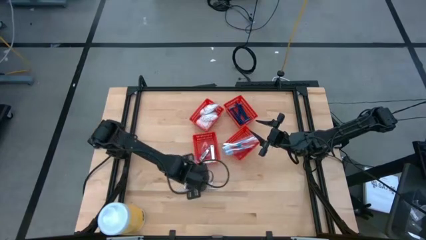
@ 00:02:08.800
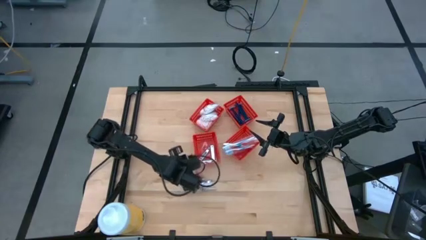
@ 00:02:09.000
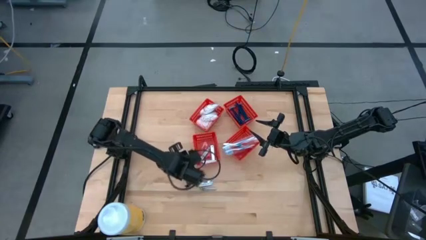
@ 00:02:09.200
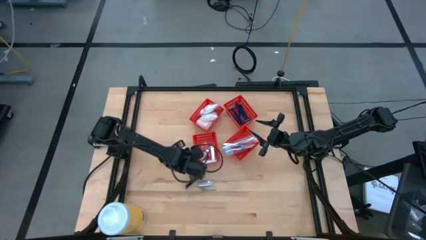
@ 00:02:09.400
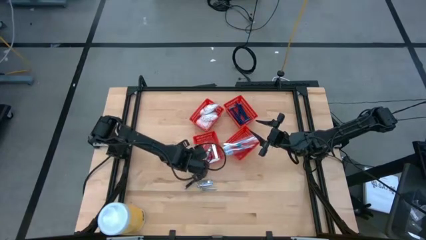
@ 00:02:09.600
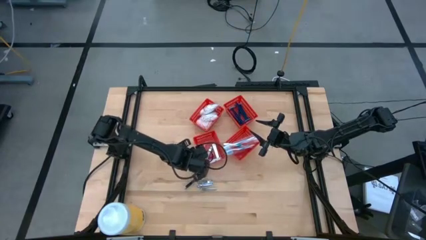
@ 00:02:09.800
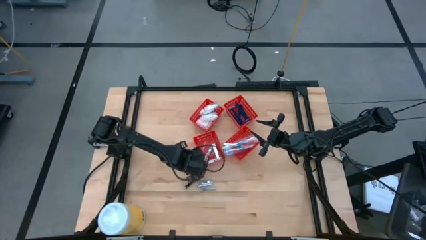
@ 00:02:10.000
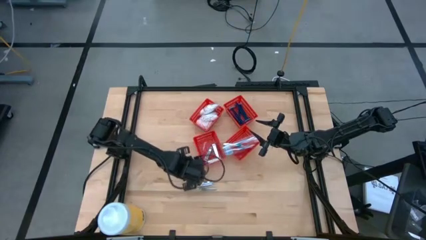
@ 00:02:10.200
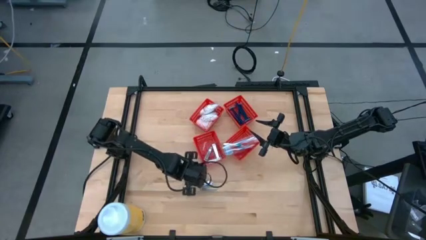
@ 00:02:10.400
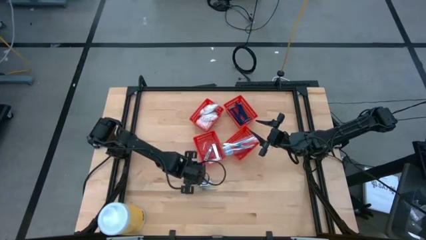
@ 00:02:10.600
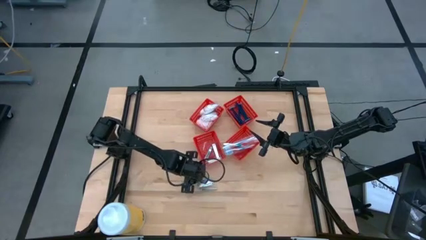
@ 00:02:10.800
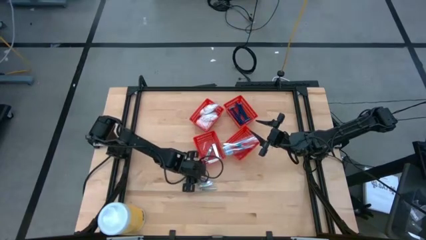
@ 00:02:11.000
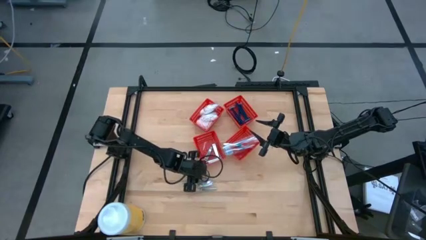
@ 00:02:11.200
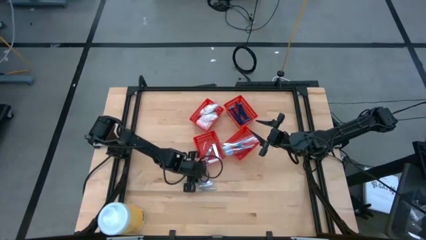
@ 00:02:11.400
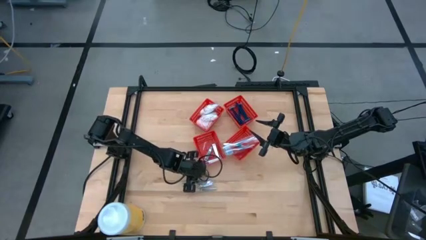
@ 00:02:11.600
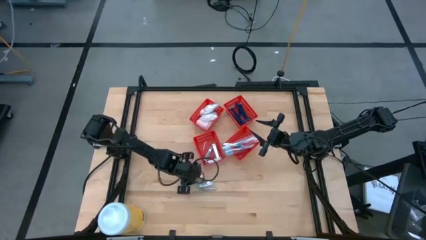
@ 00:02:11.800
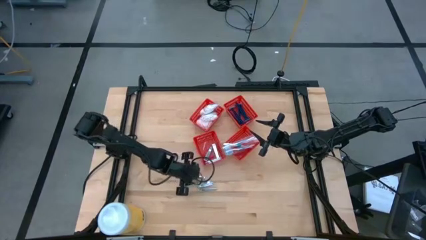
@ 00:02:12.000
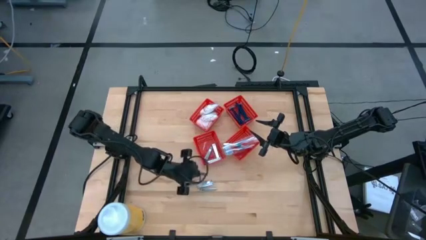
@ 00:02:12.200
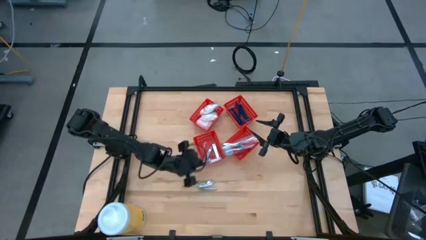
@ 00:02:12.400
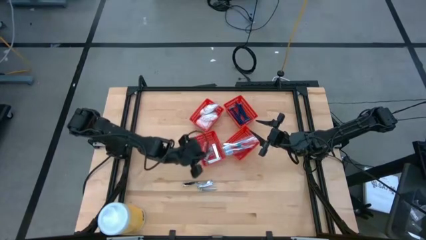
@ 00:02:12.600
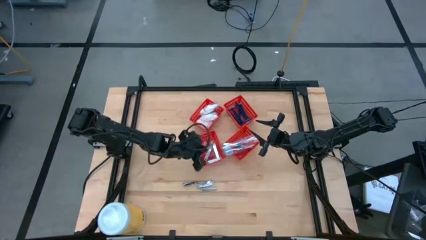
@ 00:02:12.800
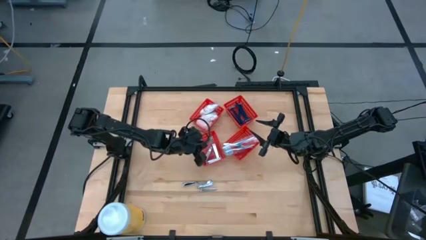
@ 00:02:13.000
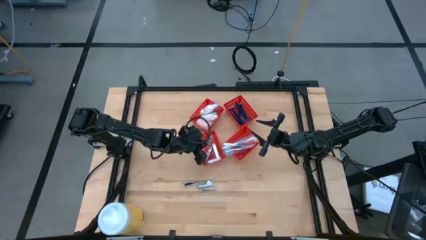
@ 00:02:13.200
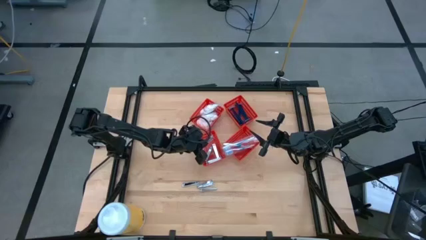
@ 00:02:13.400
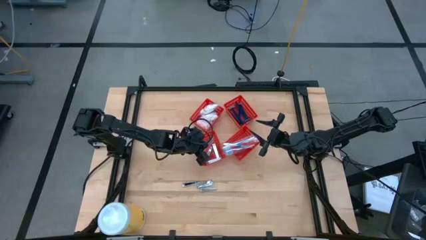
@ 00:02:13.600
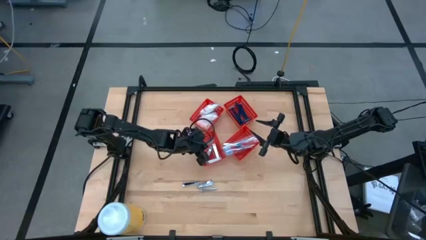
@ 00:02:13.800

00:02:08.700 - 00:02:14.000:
Task: Pick & Place Travel size toiletries
Put the silver nail cutter into the bottom left red bin

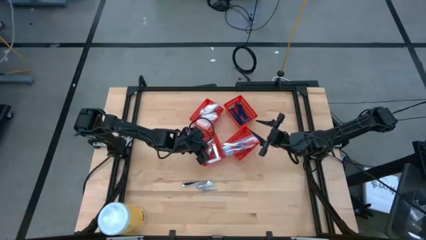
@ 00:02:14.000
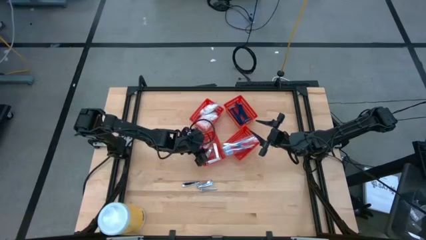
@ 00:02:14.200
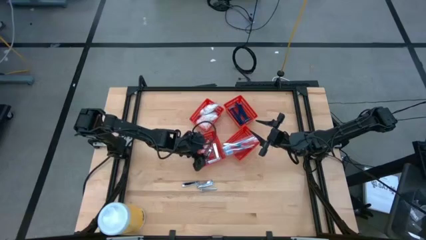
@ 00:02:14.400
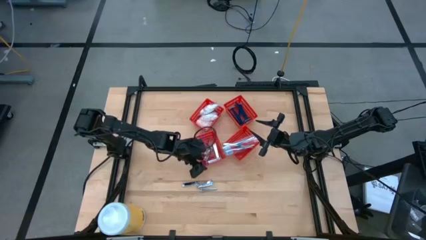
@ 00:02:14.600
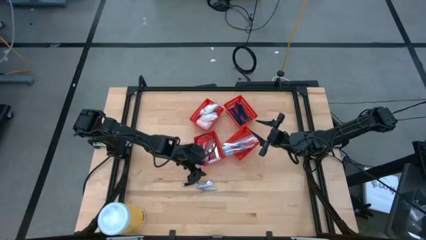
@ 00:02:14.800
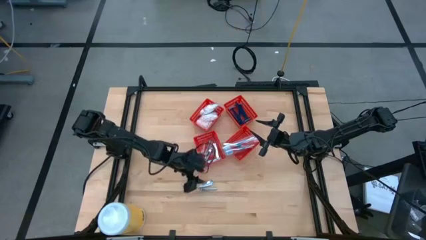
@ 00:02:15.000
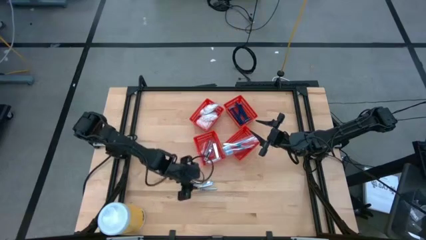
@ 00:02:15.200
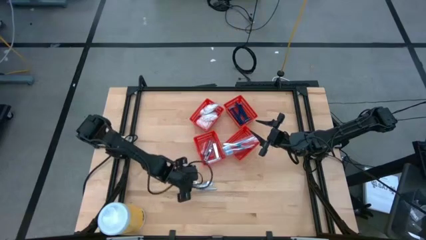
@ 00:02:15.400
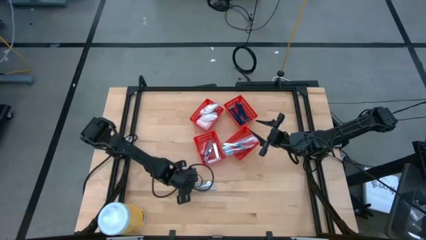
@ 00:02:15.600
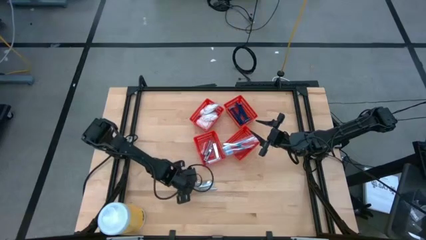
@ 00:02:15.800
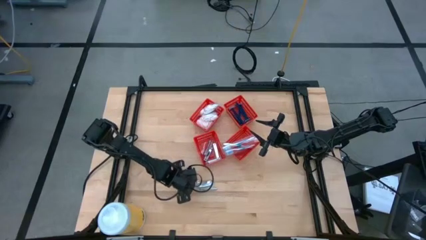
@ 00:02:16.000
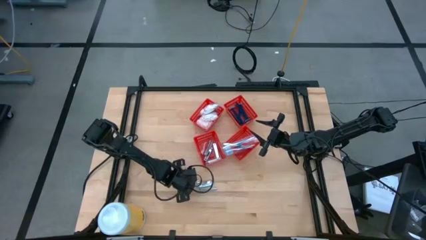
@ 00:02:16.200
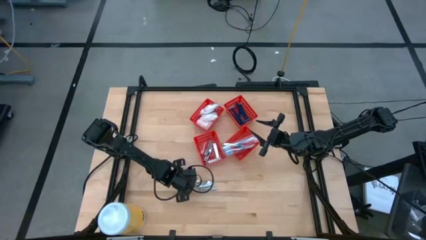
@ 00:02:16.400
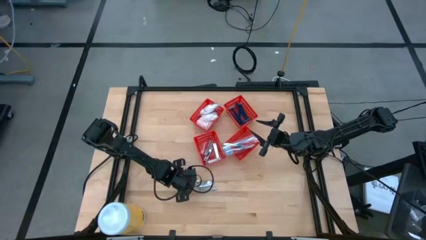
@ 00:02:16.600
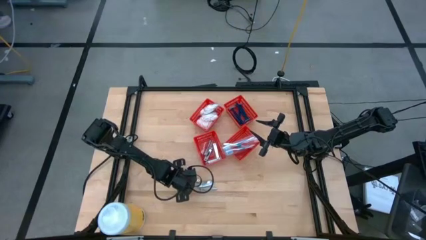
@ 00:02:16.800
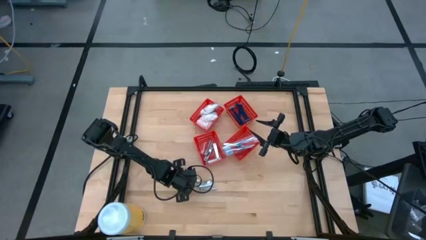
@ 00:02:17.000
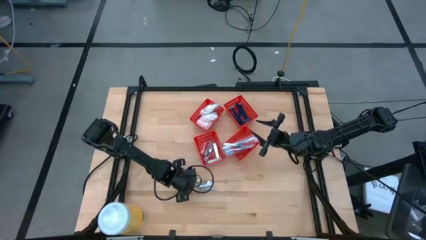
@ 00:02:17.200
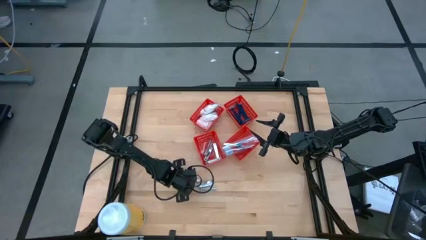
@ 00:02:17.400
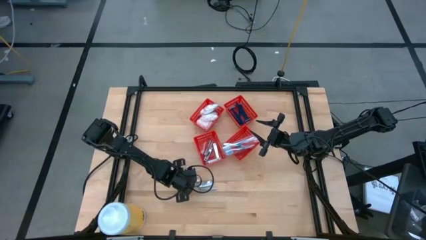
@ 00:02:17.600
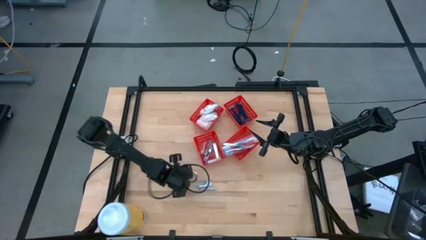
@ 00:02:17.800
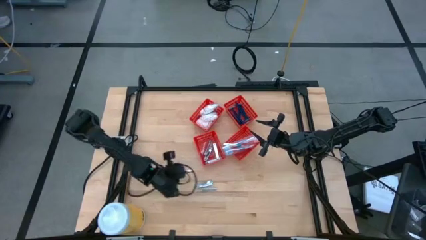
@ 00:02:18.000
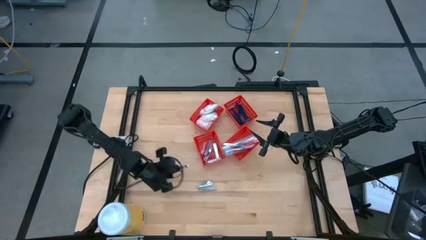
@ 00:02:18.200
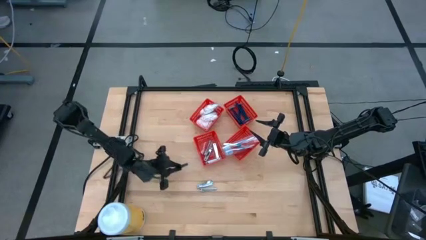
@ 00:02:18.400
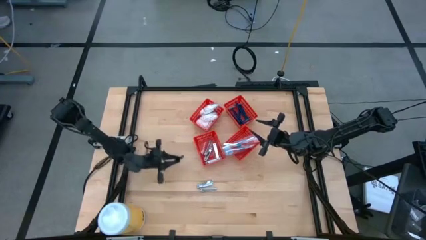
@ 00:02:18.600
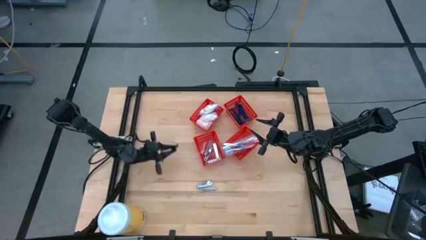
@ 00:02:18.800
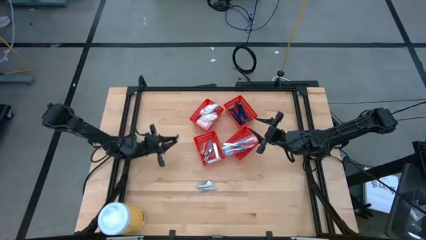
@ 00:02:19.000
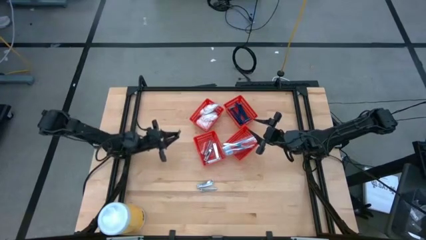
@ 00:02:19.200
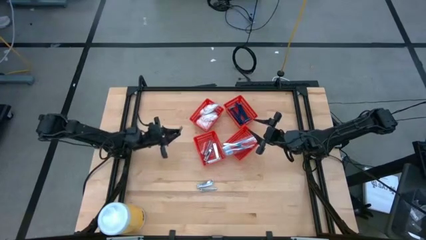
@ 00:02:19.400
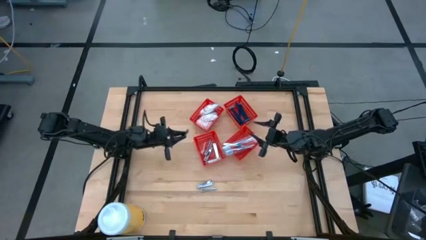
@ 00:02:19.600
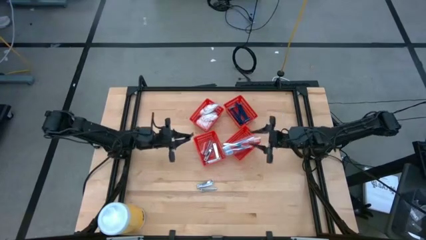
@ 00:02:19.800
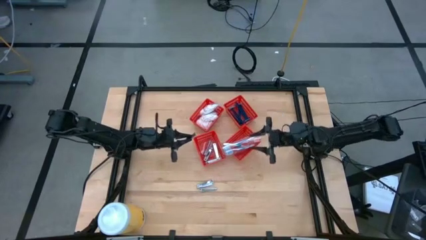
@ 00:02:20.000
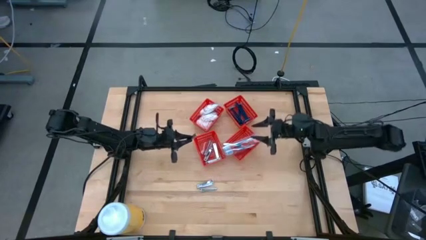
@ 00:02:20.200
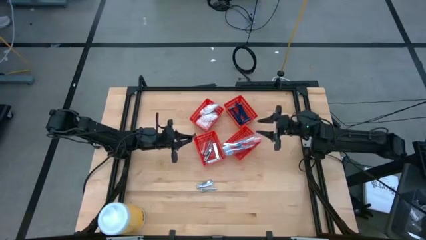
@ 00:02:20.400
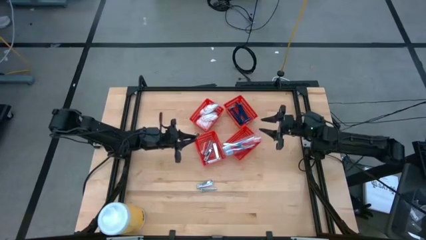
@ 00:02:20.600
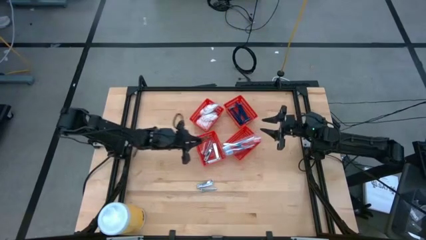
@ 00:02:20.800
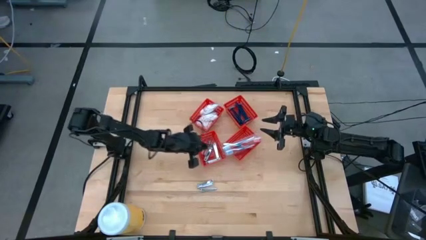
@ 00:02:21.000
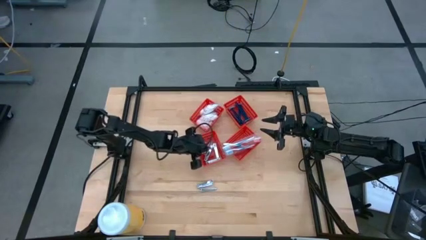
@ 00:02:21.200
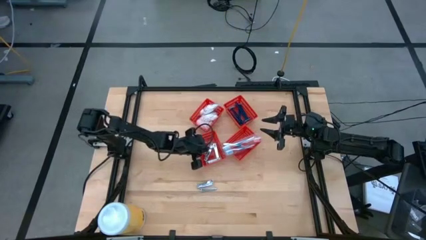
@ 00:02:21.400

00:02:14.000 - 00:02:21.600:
Put the silver nail cutter into the bottom left red bin

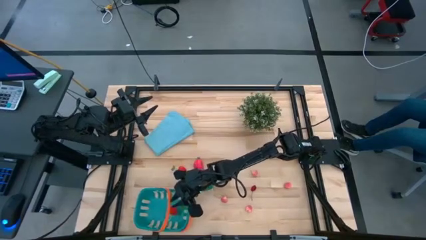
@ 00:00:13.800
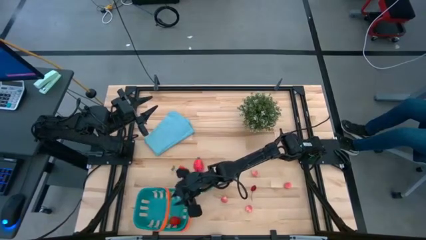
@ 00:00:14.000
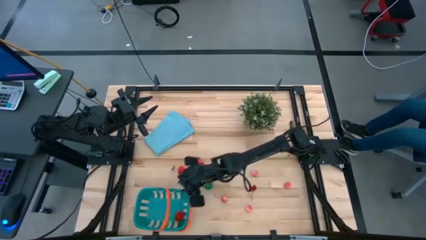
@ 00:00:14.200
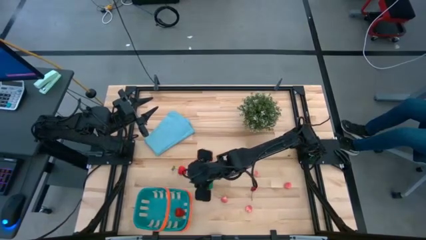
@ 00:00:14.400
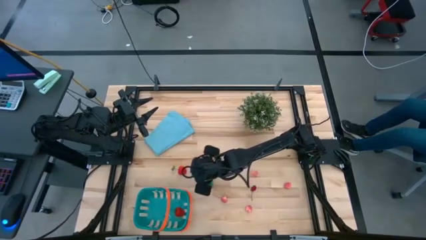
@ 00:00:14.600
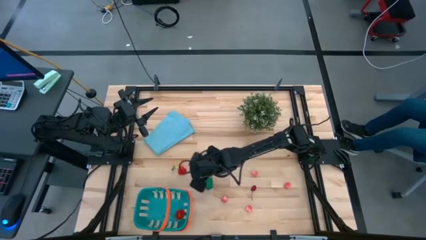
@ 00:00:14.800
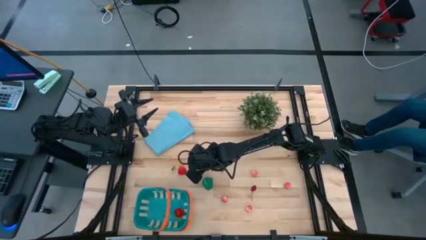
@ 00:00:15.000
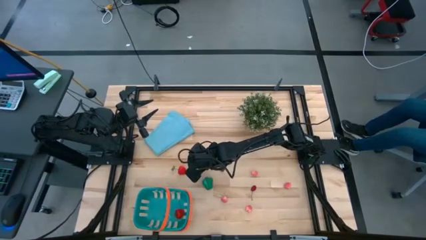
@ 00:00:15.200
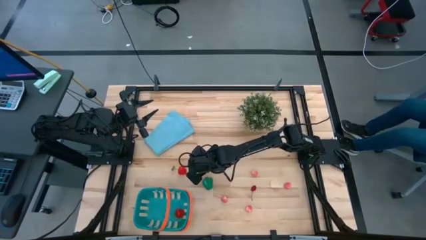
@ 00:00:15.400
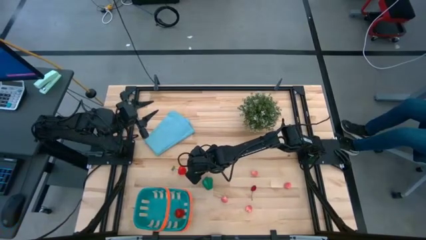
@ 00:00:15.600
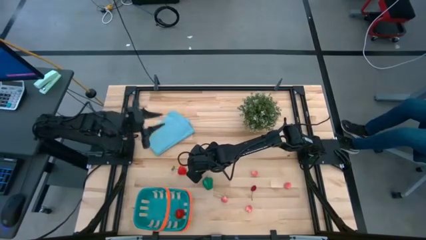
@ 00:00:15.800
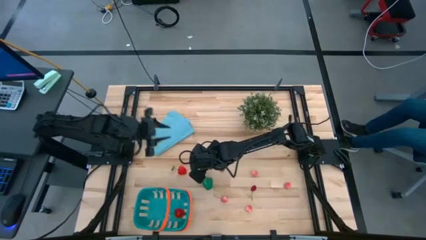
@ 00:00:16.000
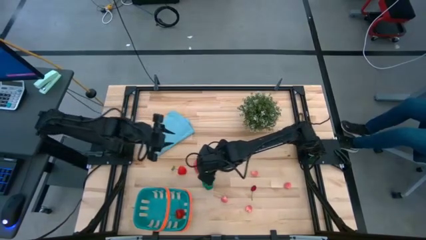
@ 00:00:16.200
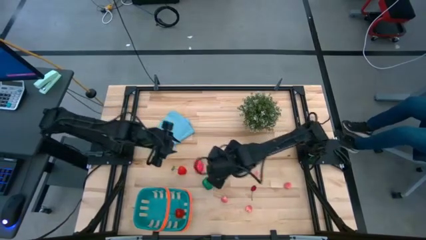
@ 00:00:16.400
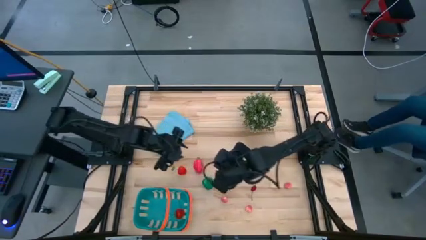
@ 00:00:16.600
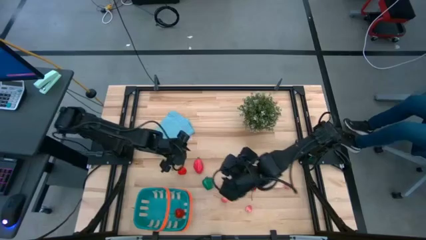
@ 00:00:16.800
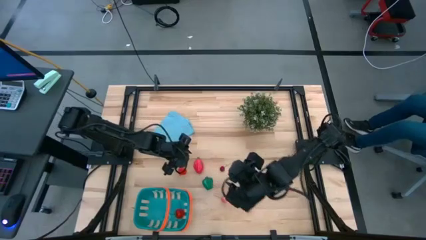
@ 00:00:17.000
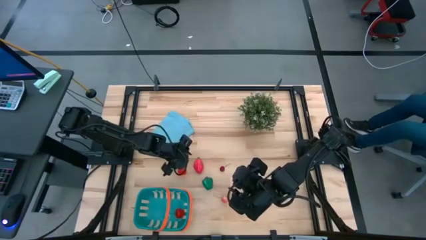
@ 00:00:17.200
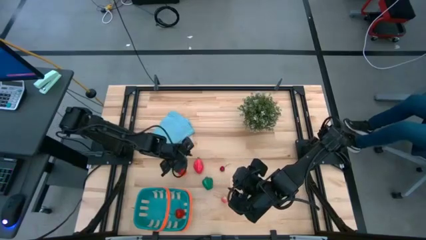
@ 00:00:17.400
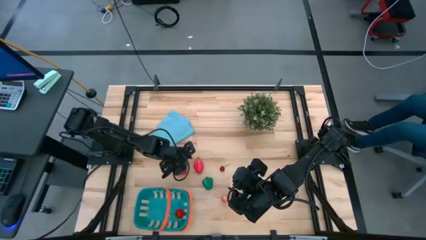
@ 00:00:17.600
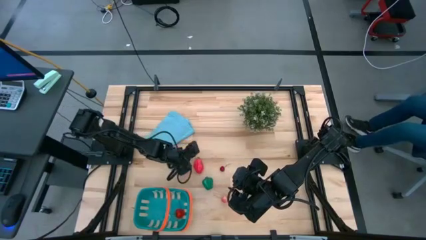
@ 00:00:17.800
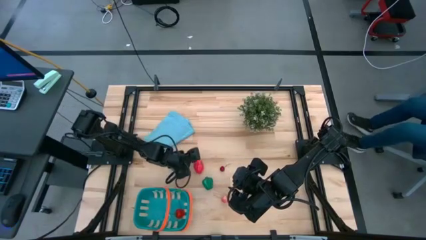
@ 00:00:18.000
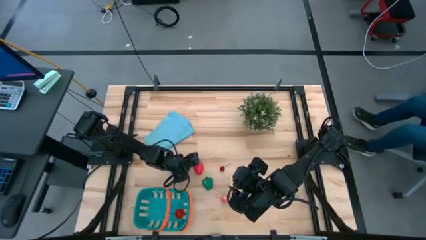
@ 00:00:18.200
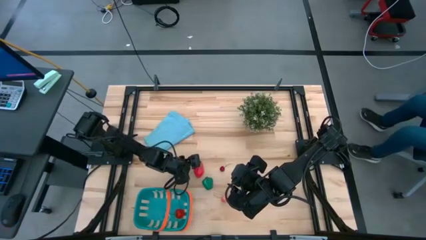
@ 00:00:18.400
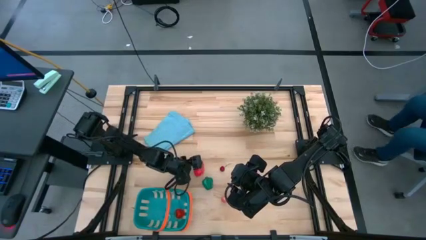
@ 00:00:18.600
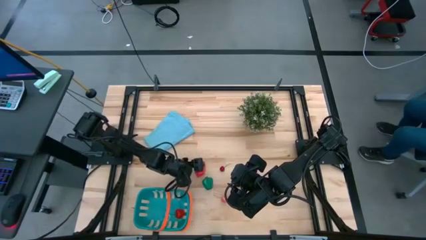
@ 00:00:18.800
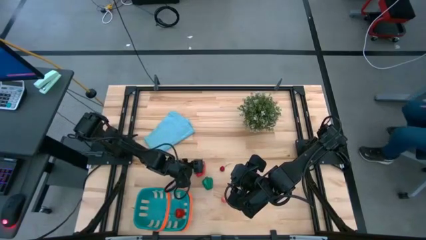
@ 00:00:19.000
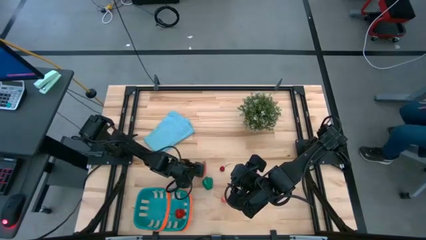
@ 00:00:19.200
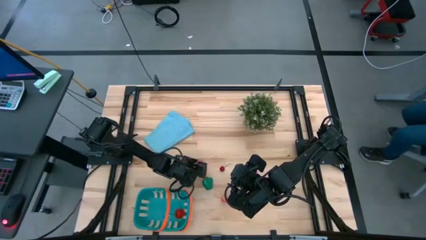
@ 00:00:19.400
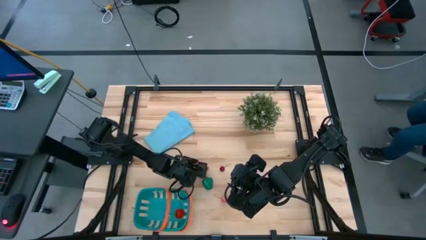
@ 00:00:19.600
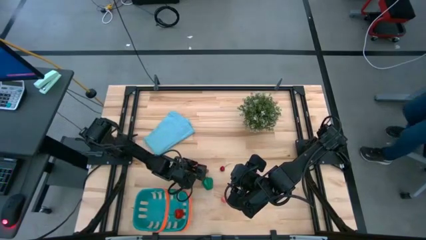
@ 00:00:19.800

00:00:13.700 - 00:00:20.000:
Task: Pick and placing Produce into tupperware
Put the red dragonfruit into the blue basket
